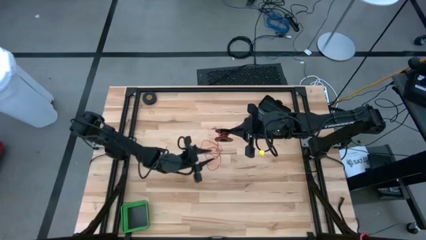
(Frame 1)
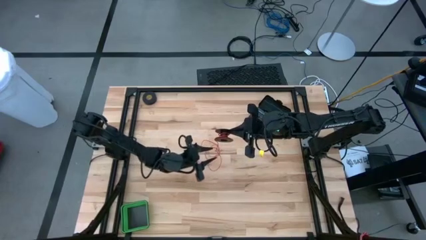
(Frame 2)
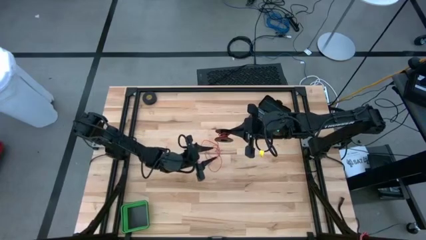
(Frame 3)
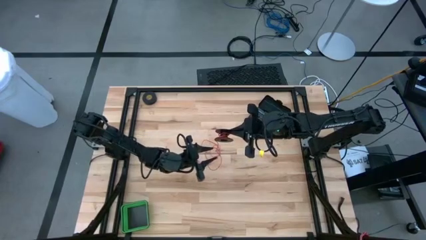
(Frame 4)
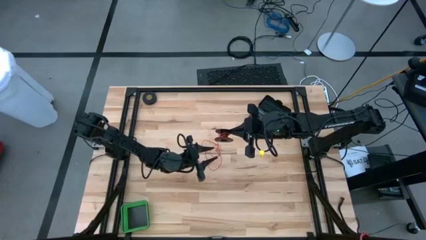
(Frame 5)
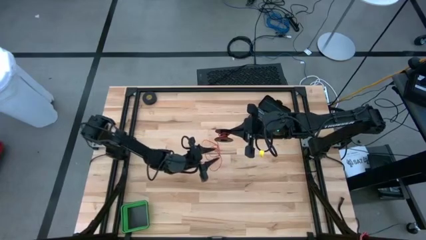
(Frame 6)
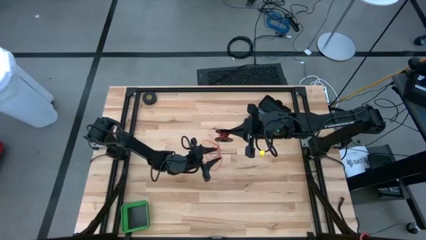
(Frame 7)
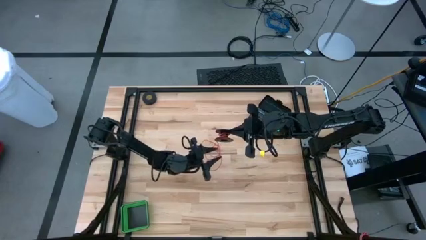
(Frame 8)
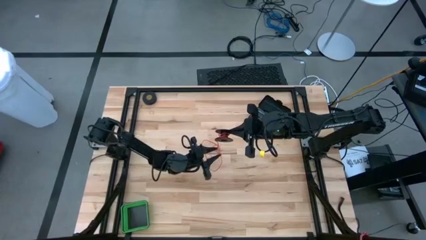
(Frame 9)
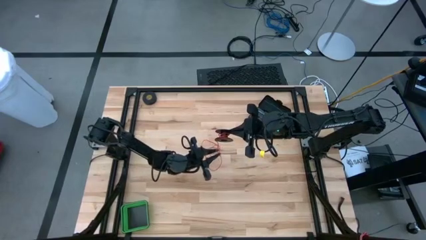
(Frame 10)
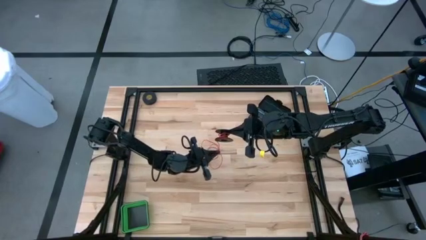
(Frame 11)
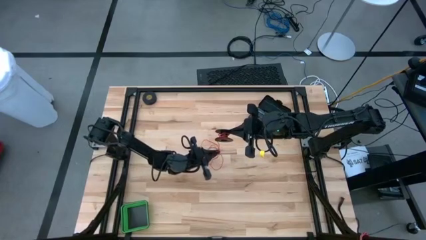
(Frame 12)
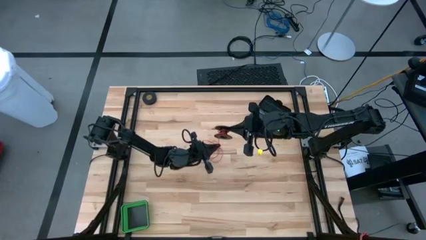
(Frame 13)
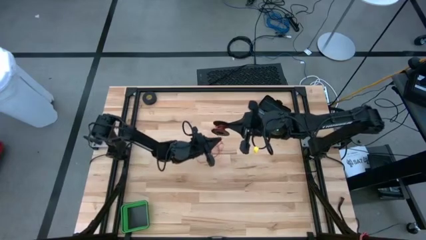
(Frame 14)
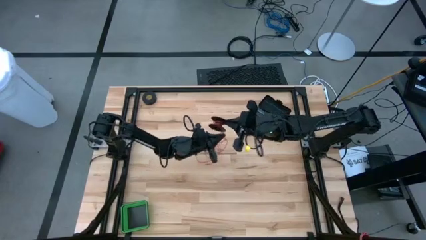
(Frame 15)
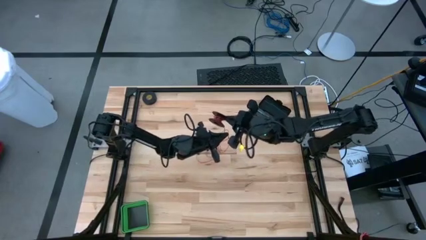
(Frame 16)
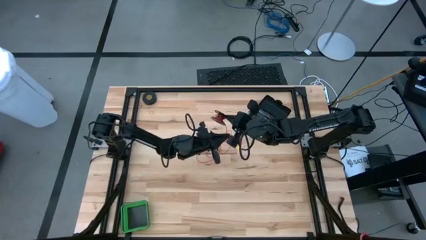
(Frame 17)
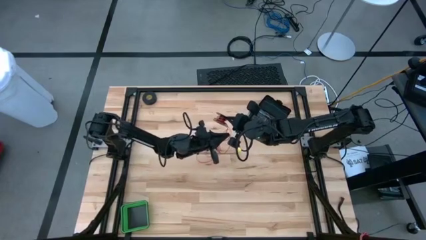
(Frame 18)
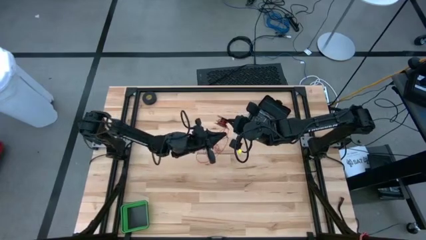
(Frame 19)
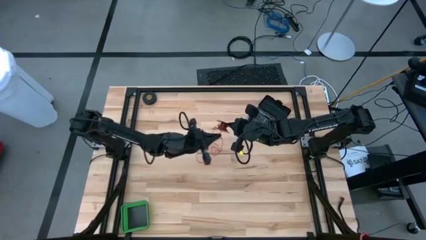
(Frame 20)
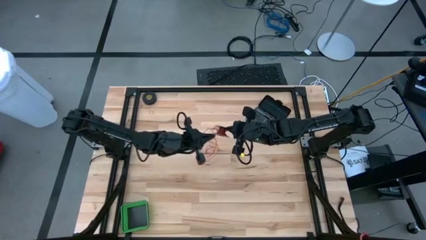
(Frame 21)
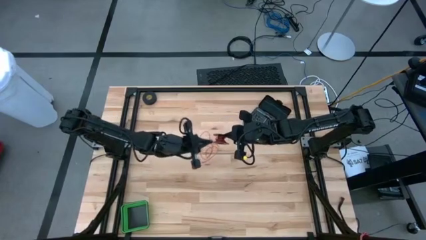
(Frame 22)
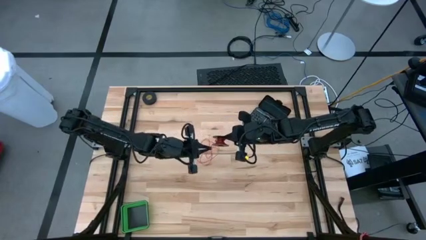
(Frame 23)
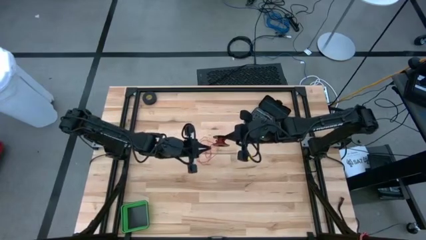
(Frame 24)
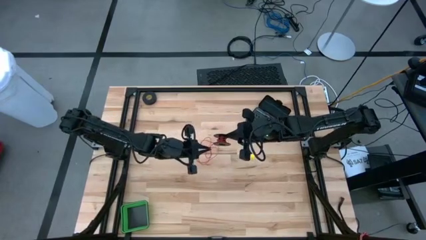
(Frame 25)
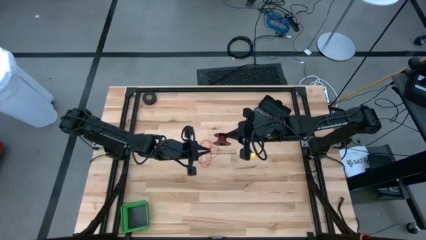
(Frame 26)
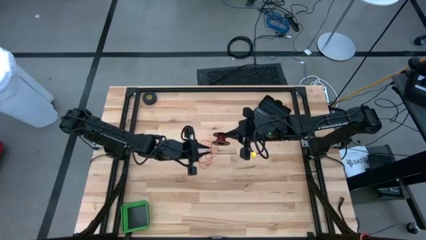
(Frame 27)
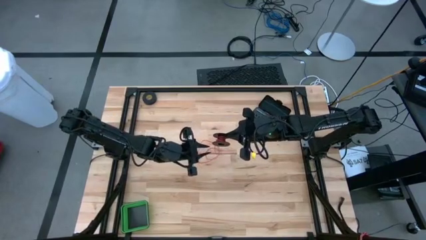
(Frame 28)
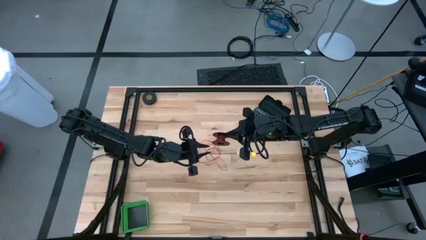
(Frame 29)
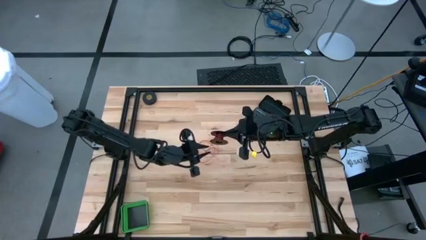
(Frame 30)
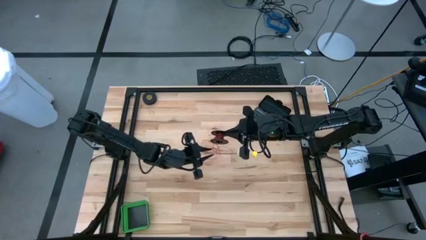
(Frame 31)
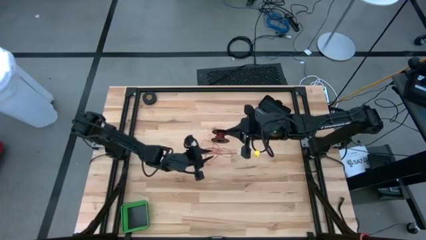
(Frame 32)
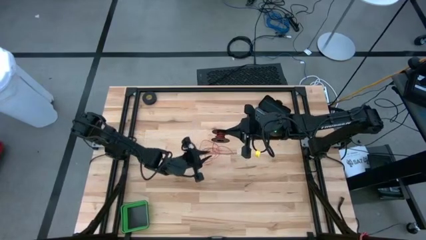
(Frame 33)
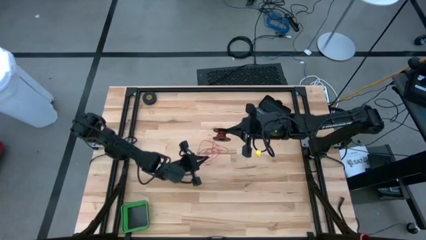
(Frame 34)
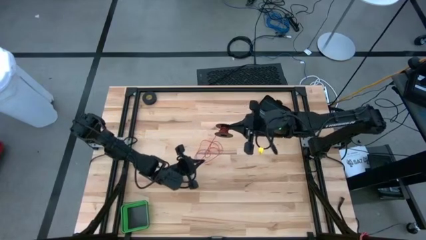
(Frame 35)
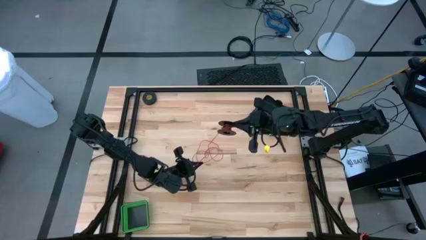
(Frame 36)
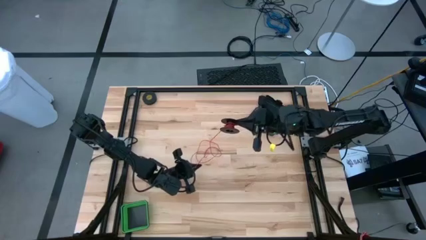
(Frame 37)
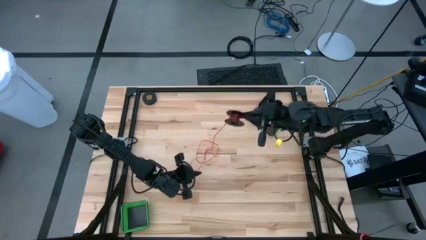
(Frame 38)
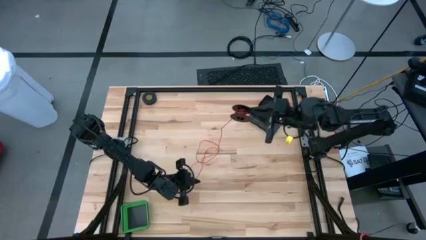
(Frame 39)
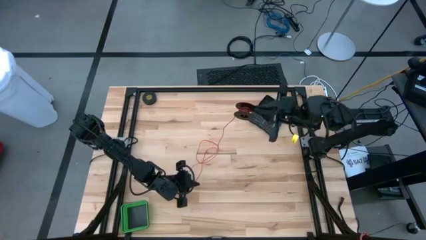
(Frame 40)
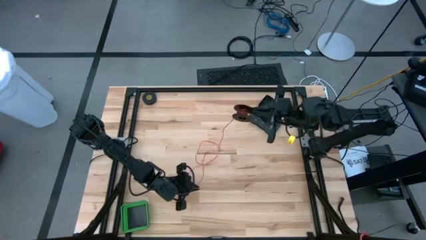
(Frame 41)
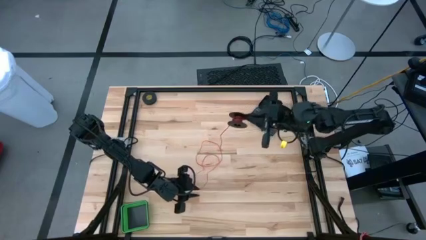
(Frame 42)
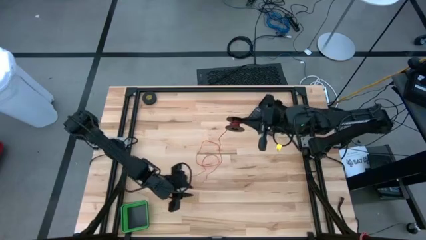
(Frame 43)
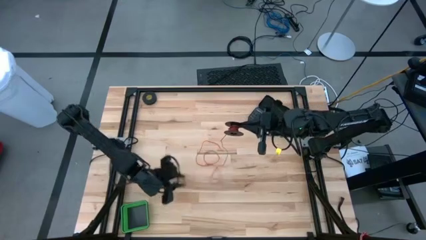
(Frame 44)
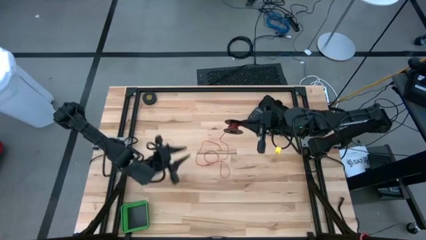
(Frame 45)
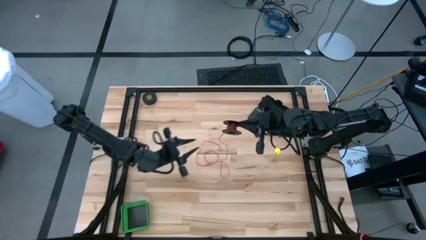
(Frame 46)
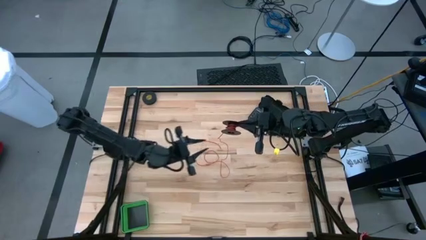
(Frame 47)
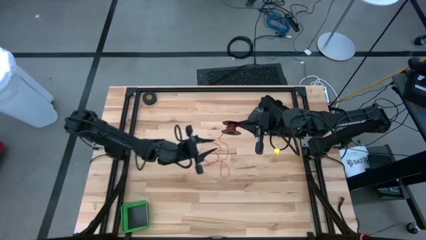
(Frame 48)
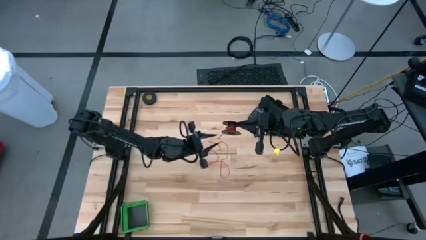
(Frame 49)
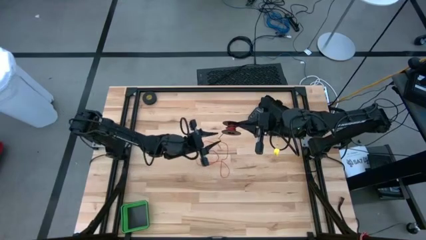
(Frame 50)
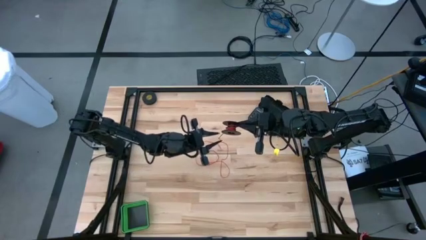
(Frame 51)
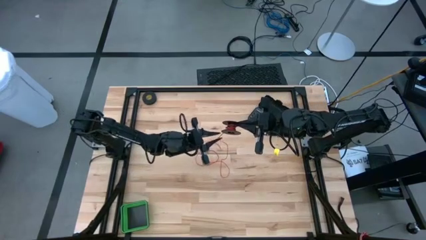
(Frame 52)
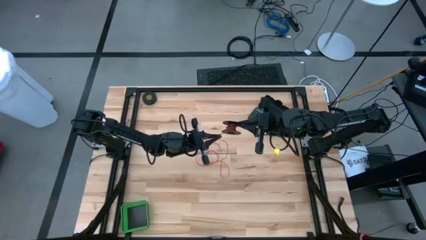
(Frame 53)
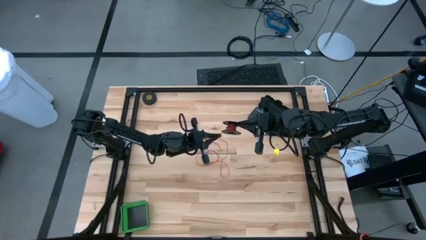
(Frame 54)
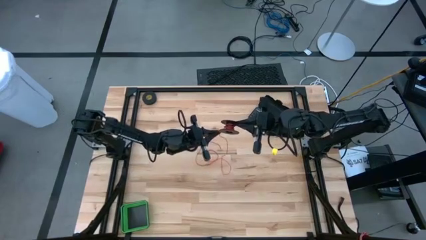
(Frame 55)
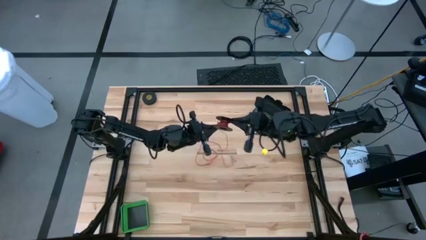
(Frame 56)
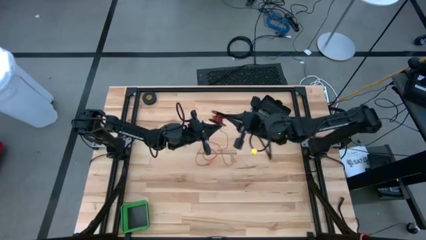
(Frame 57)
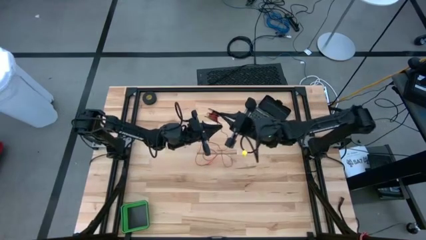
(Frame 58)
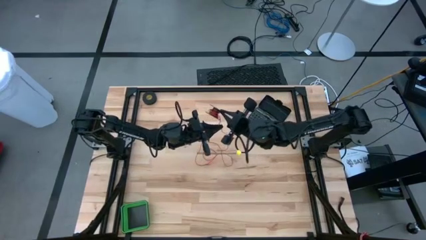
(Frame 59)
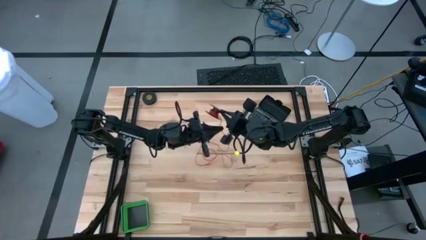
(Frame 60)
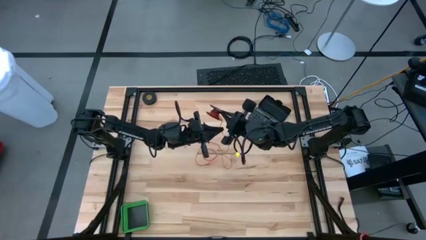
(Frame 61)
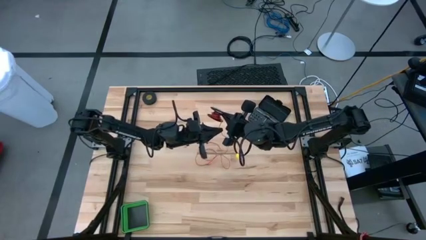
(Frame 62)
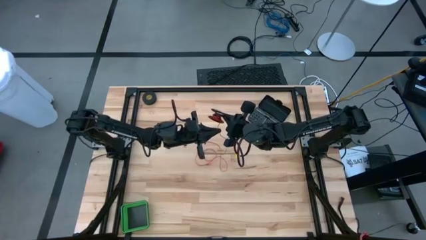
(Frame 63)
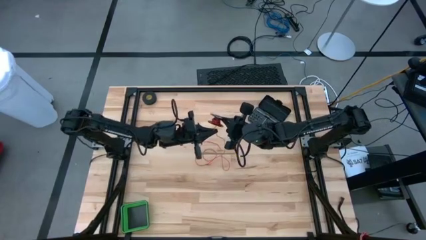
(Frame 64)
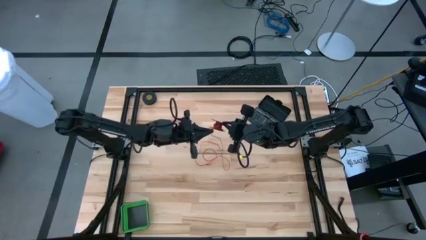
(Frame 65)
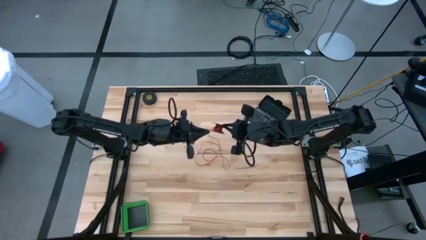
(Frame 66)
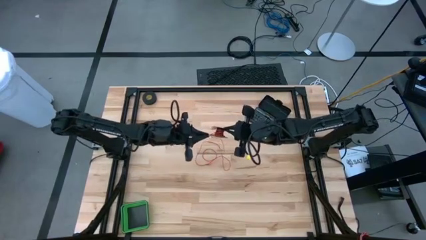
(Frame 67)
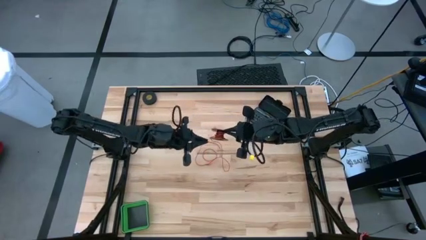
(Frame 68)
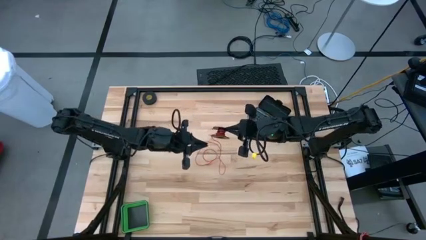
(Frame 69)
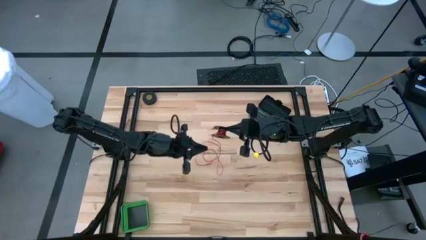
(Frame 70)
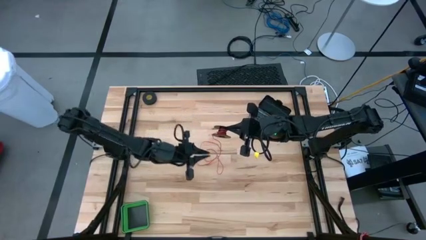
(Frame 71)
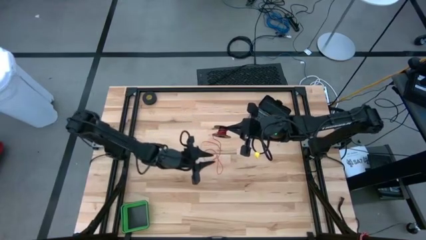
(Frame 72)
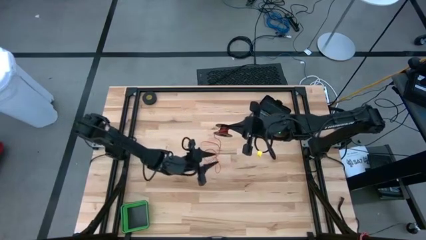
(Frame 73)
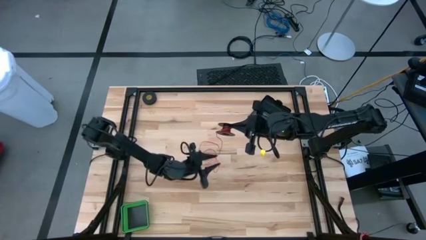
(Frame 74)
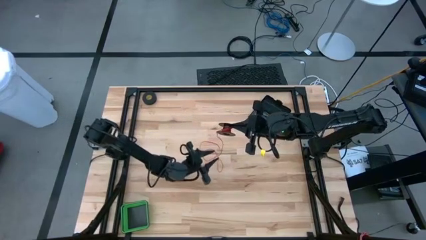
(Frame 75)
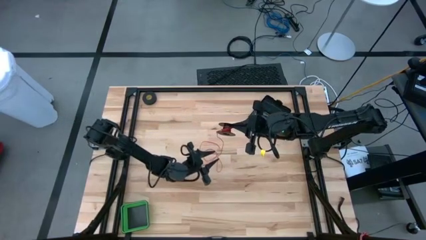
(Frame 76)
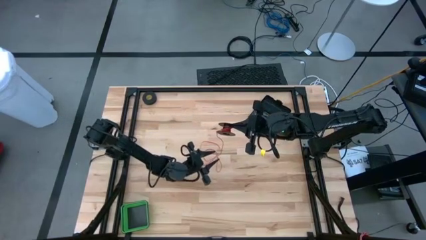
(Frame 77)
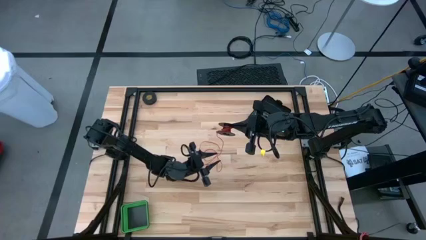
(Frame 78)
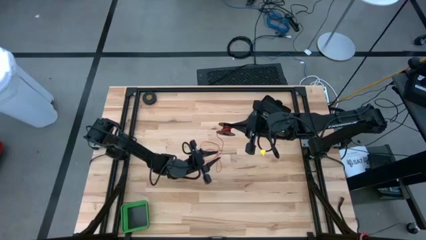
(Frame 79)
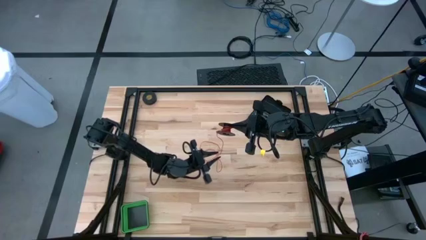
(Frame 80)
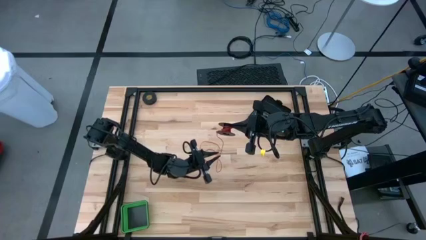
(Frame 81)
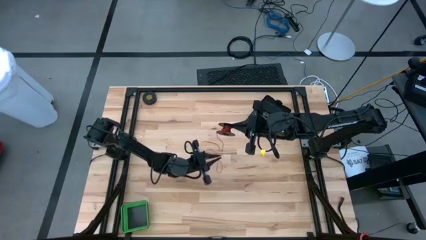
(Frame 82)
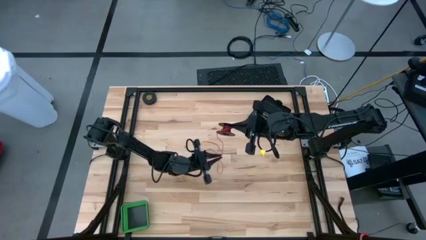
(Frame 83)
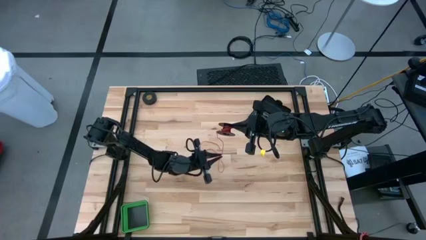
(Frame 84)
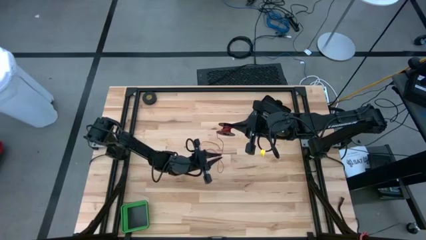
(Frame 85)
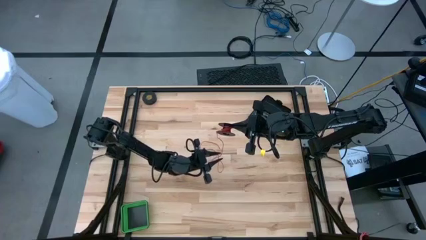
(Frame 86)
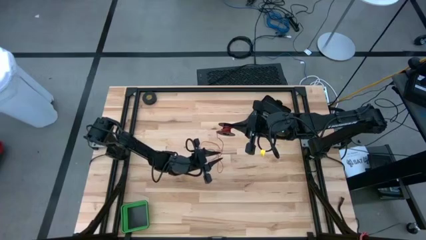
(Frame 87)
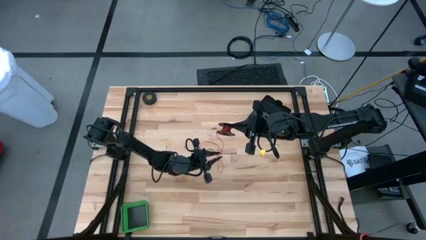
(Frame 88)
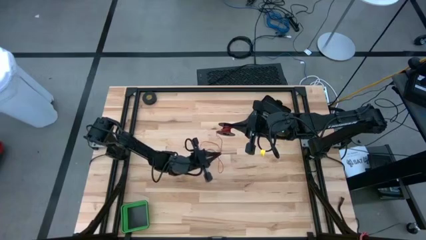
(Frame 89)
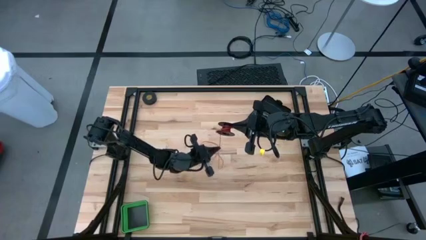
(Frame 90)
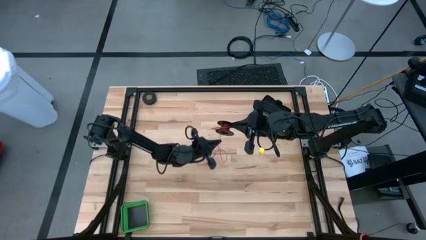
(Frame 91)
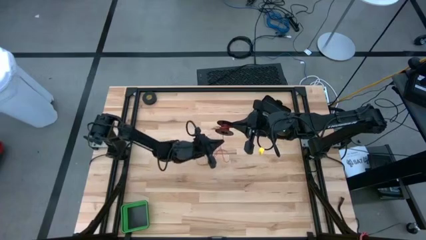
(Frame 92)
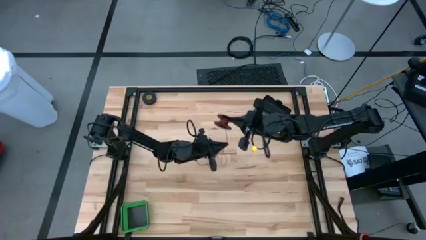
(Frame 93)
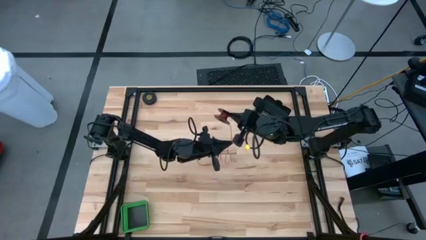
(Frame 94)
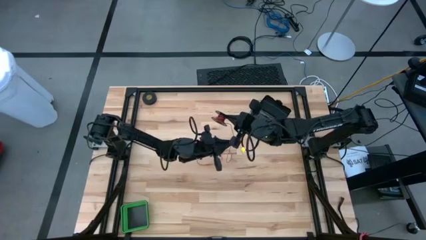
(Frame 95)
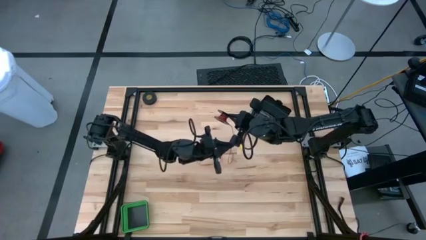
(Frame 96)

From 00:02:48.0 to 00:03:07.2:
Task: Coil cords
Coil the red wire into the spool
